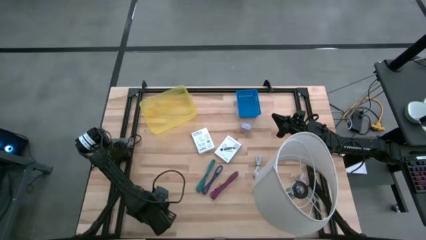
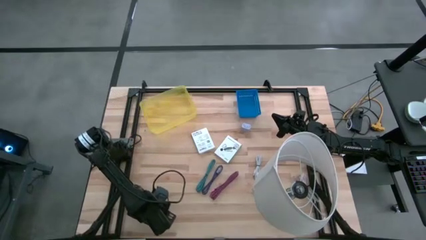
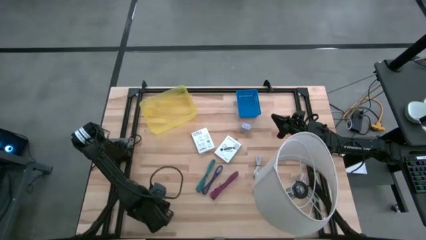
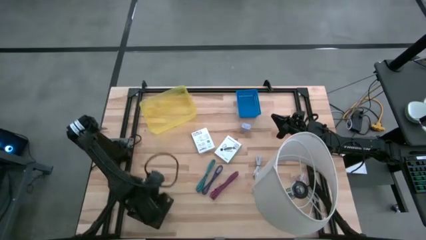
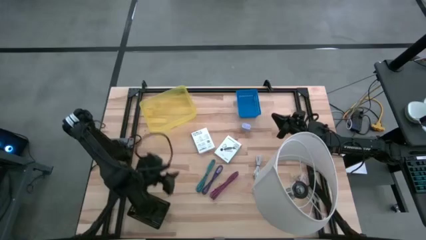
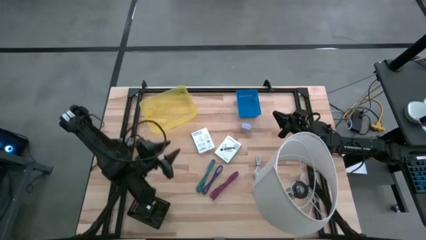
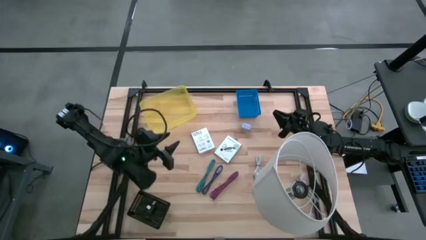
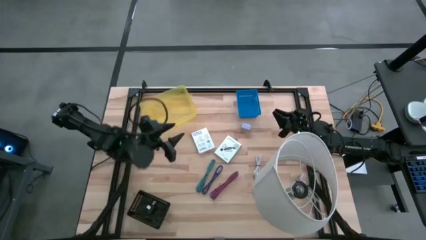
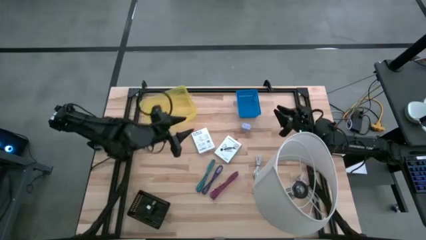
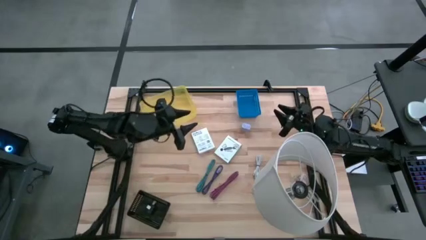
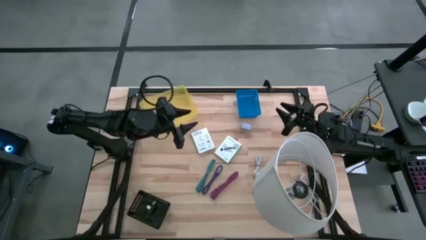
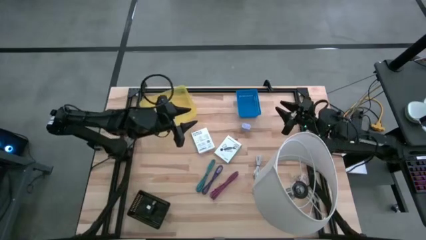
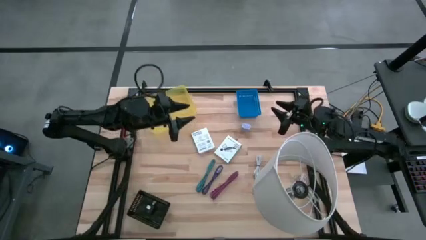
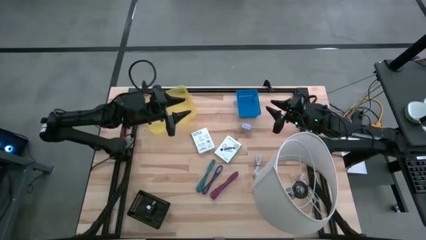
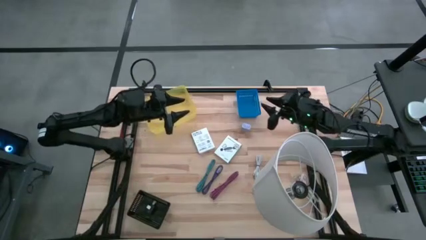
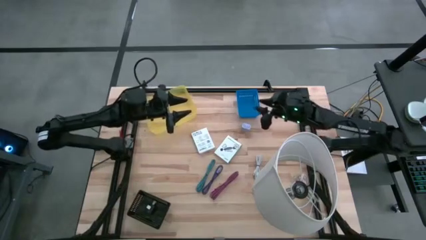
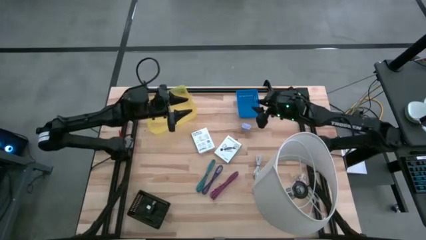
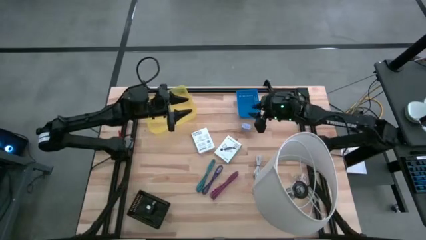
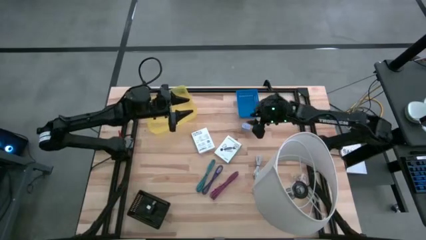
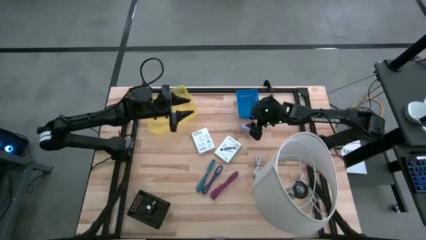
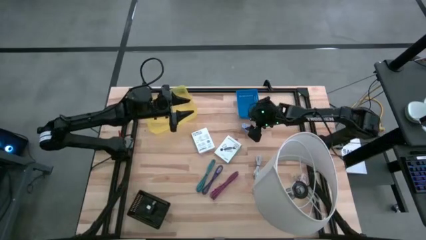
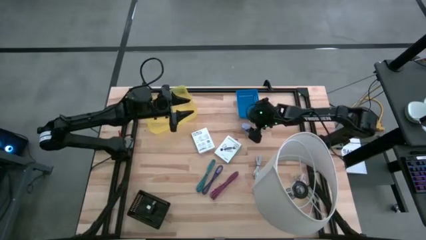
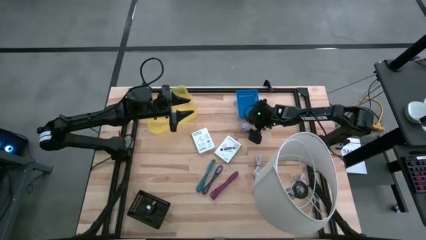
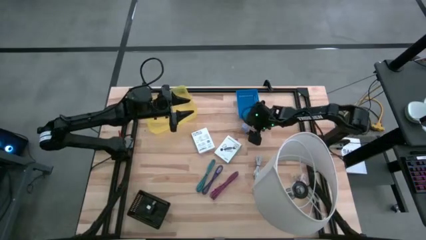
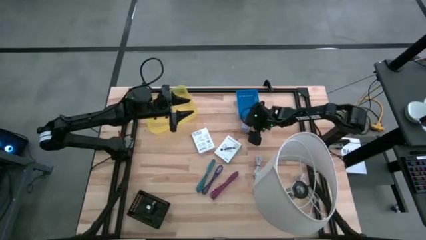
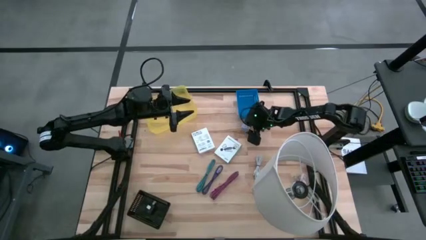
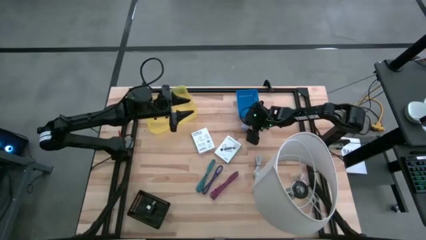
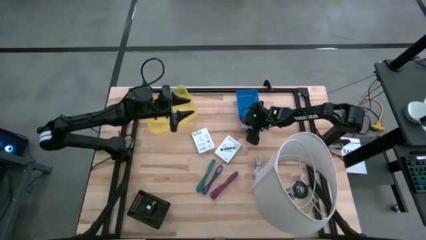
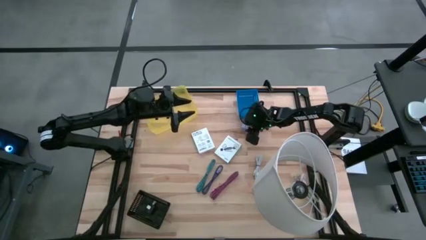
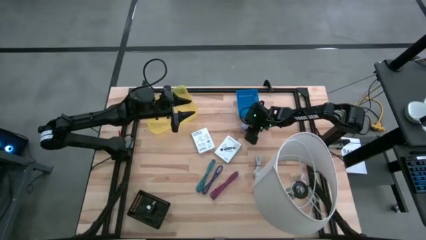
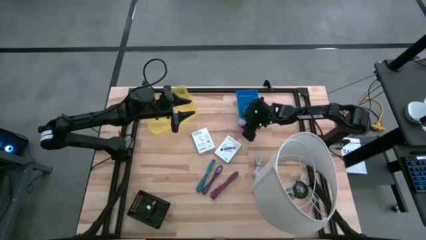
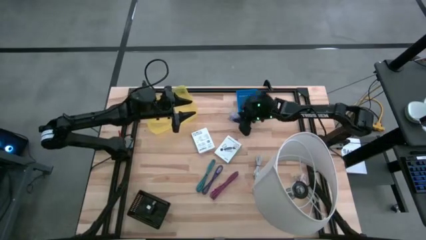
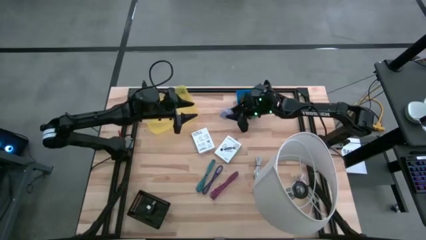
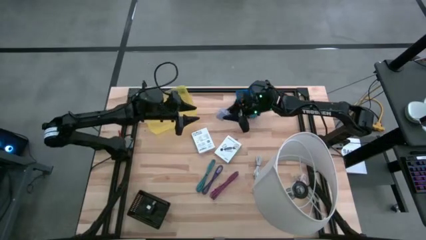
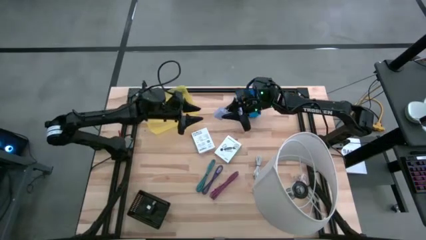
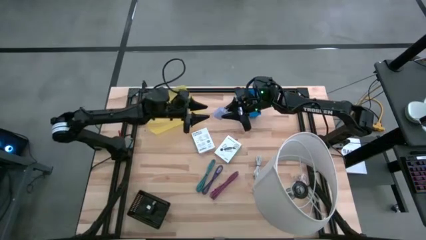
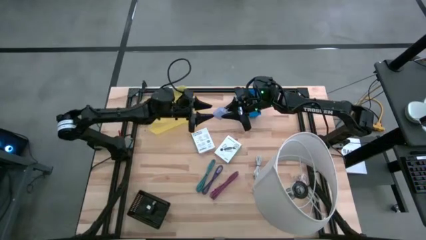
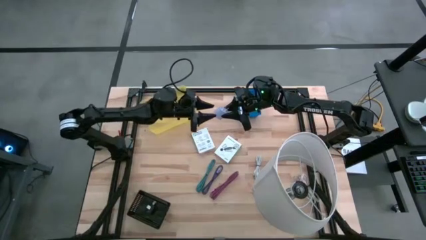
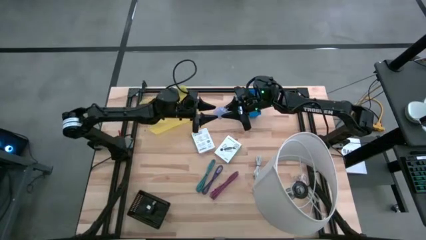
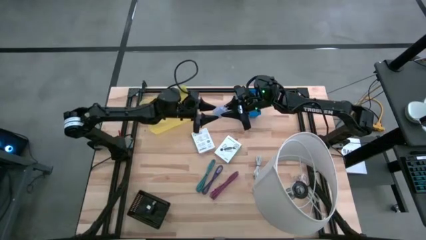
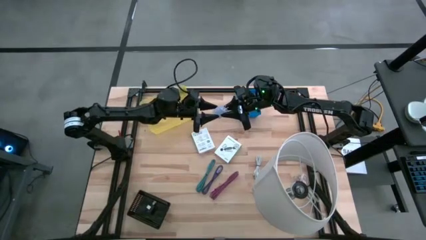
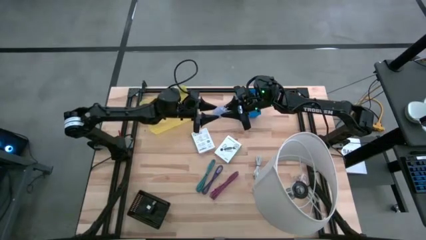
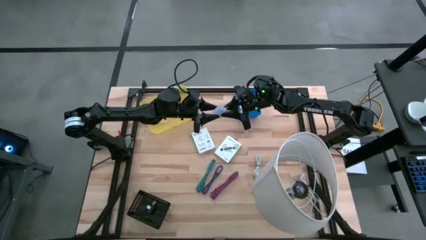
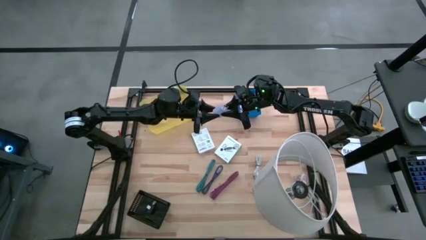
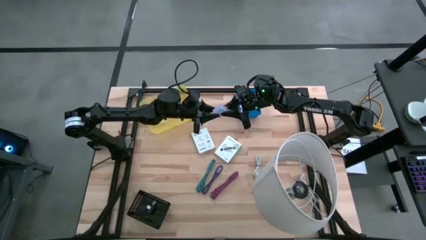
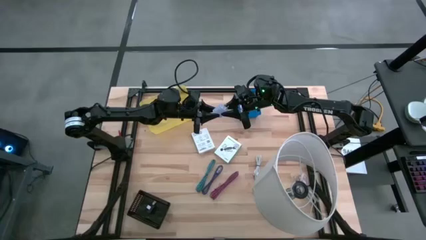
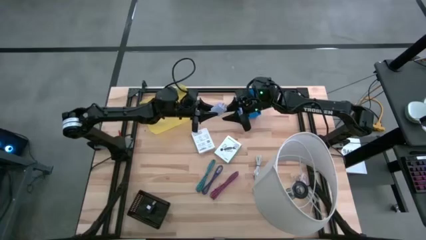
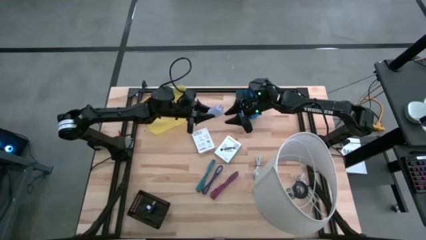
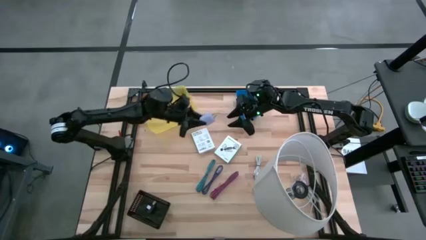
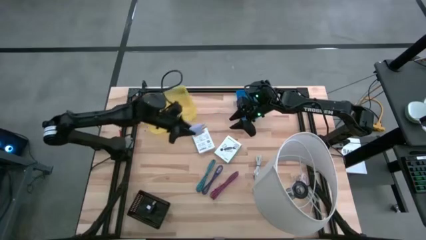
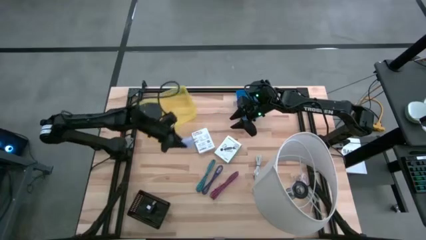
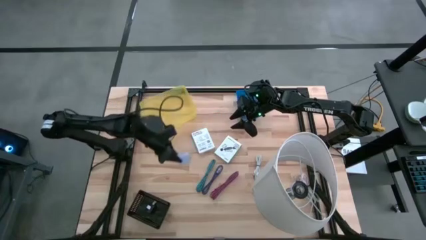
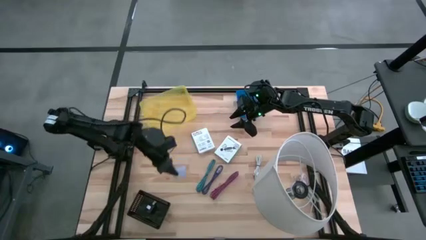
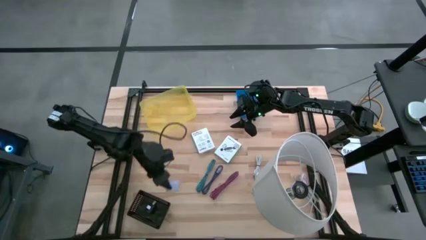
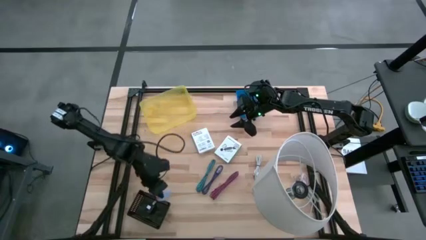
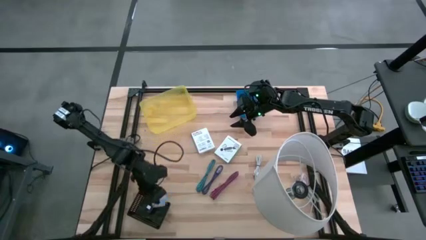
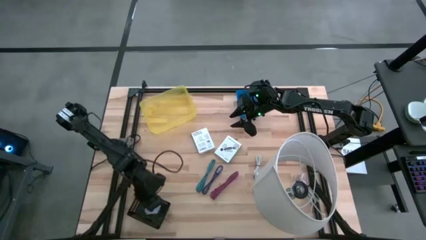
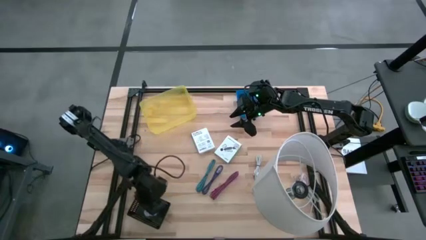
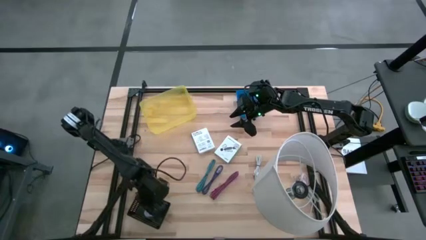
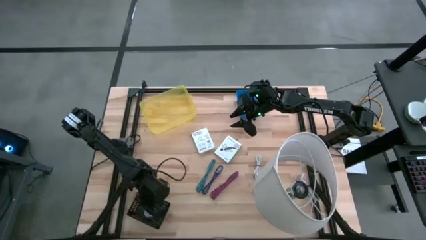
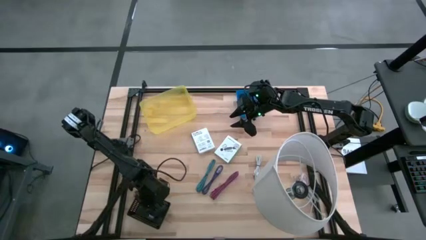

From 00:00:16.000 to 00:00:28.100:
Task: Pick and place items into bin
Put the white charger adapter into the black bin

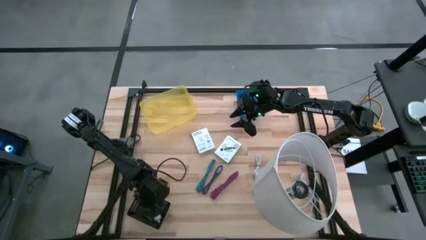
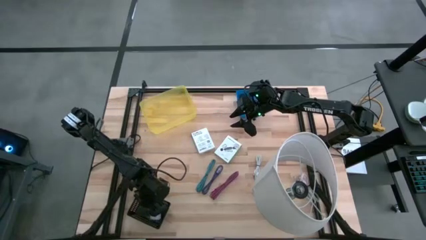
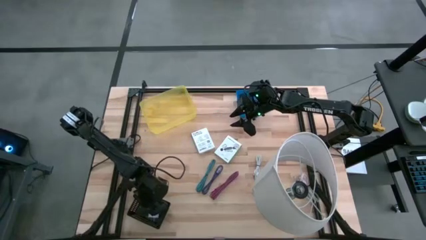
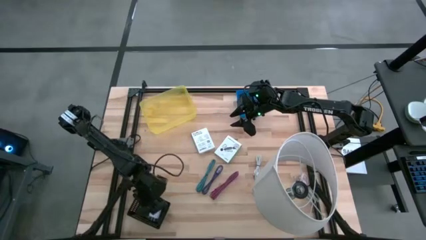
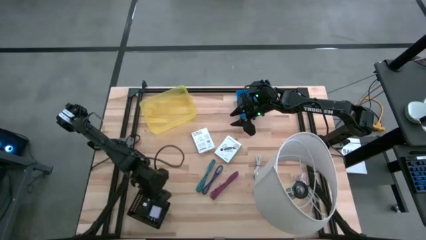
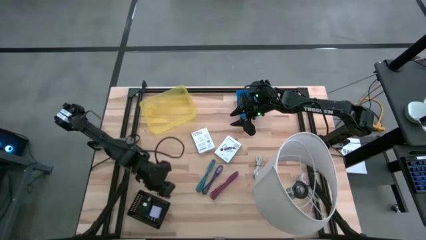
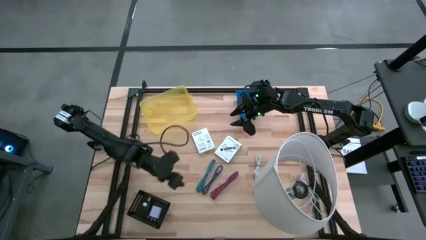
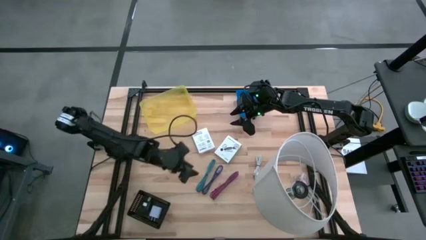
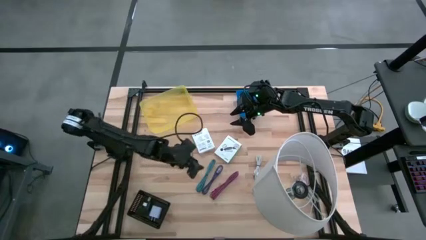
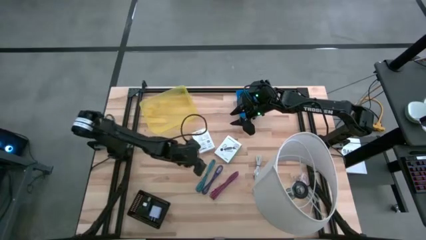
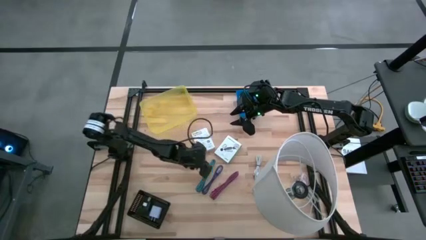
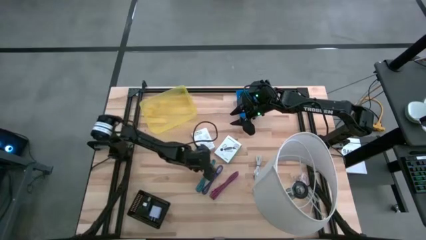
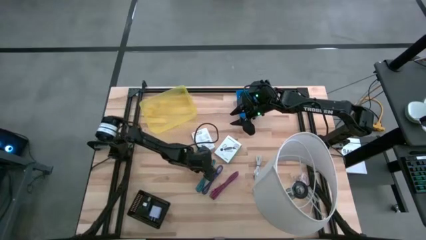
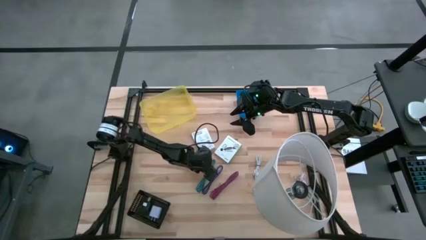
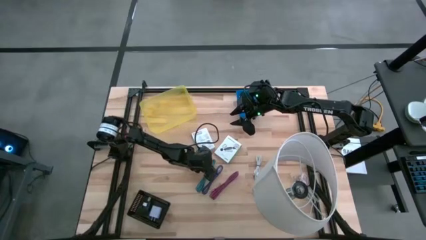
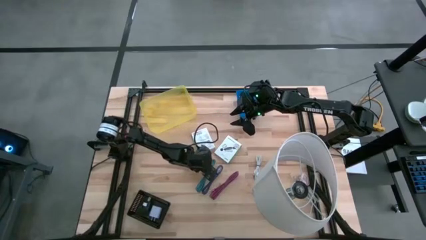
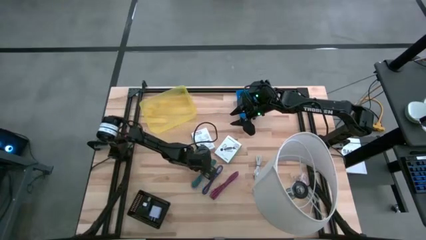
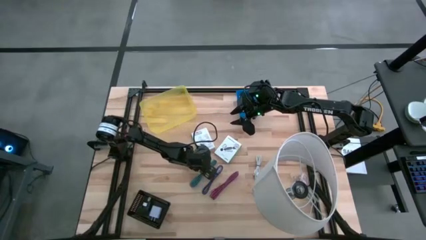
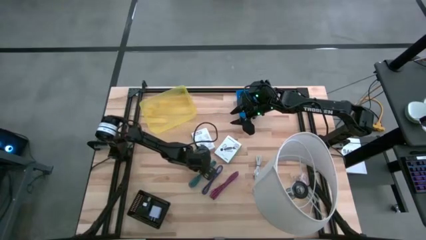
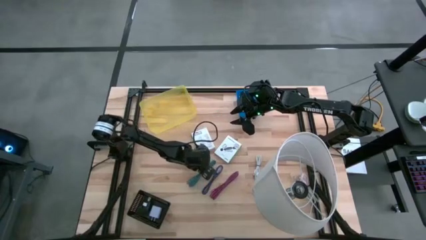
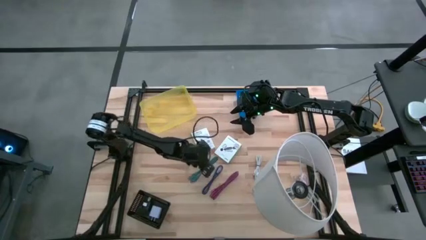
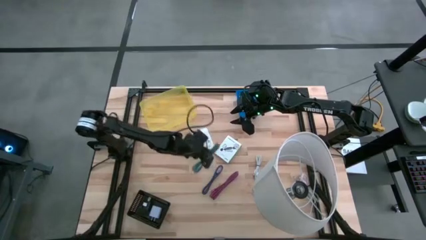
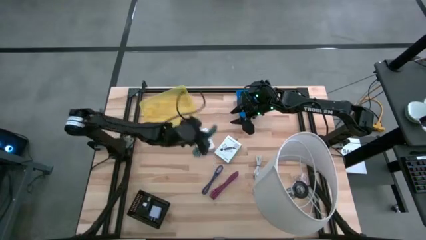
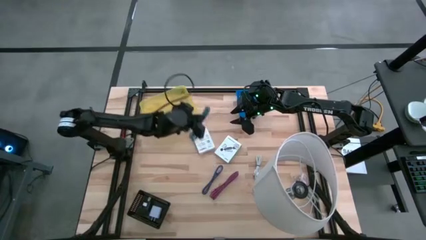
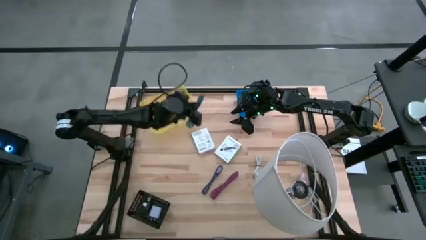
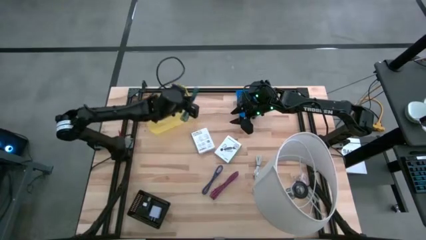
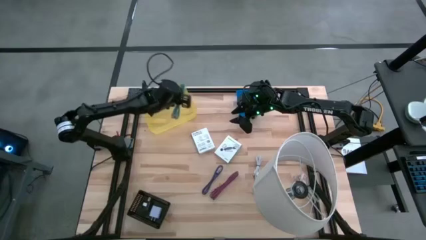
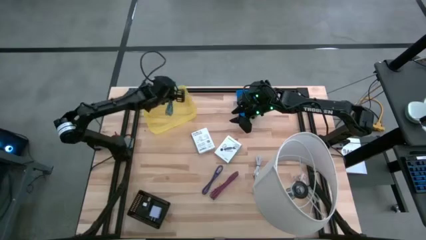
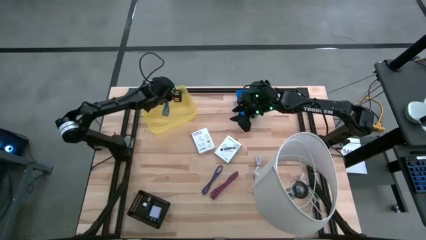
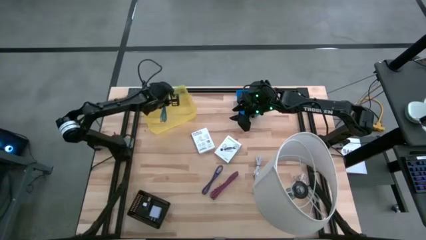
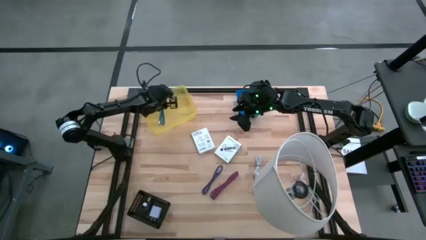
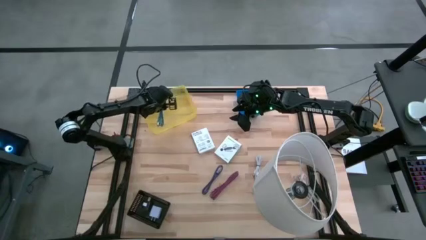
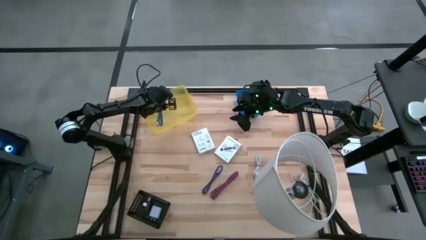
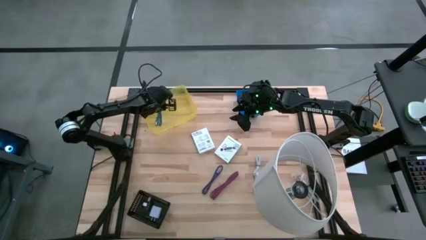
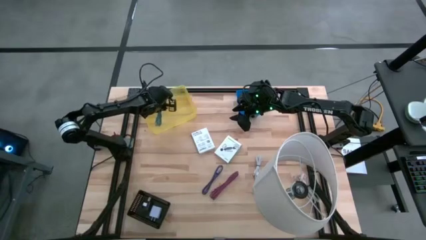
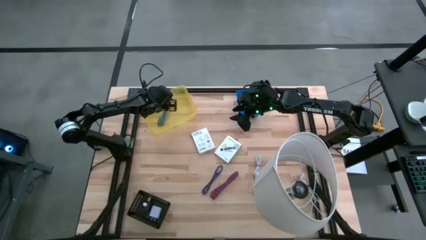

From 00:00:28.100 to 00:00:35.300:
Put the light blue charger cable into the yellow bin
